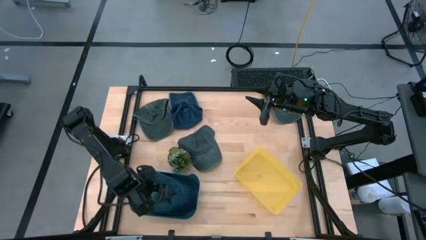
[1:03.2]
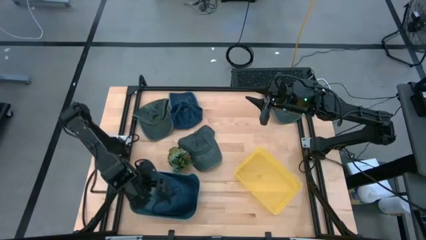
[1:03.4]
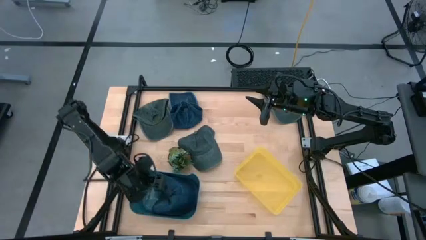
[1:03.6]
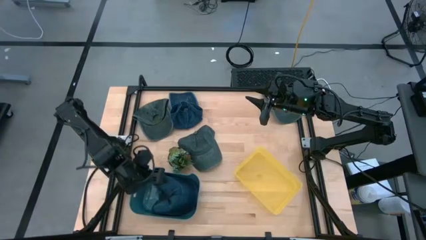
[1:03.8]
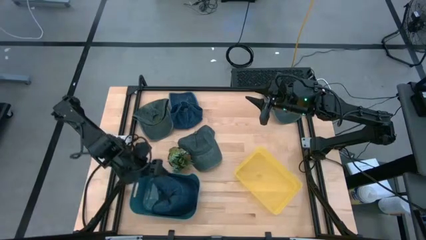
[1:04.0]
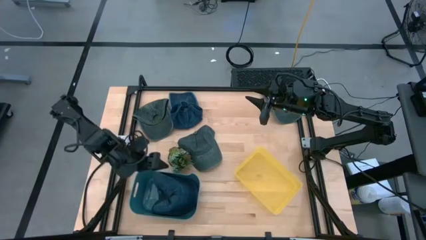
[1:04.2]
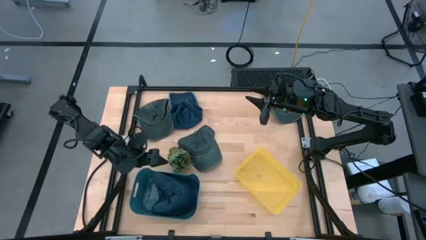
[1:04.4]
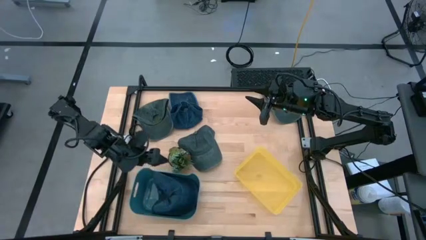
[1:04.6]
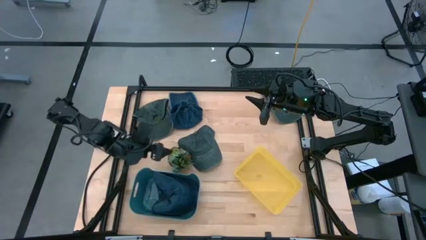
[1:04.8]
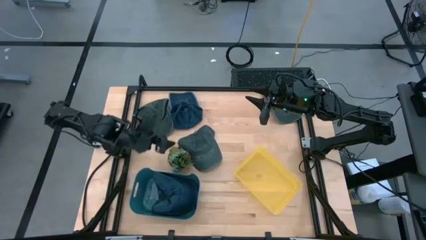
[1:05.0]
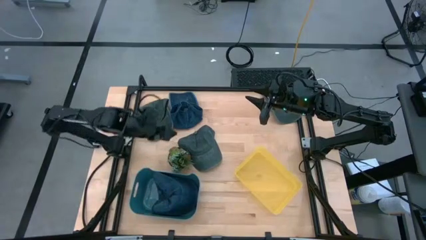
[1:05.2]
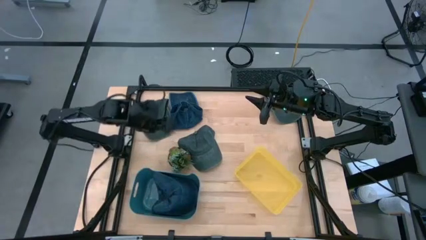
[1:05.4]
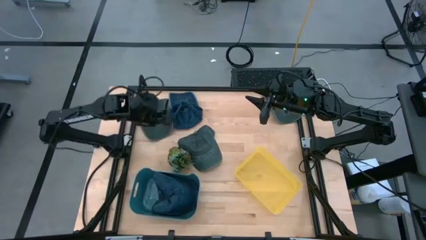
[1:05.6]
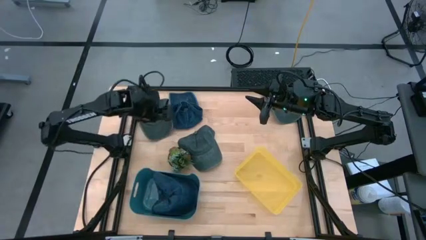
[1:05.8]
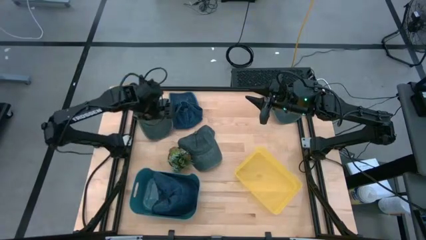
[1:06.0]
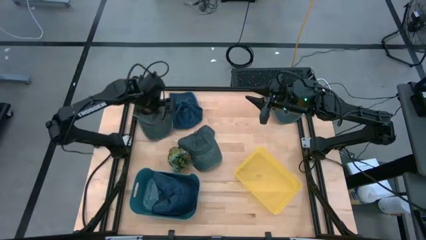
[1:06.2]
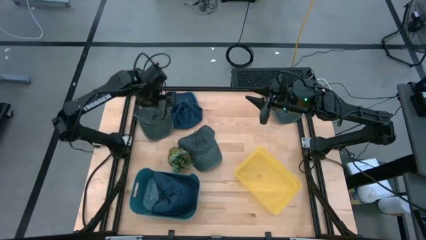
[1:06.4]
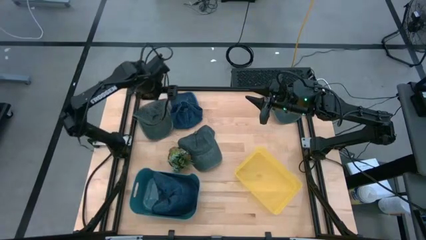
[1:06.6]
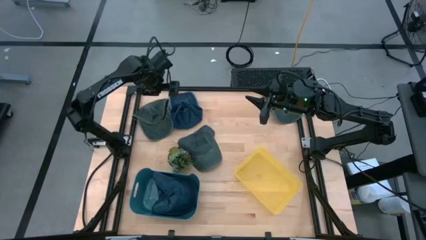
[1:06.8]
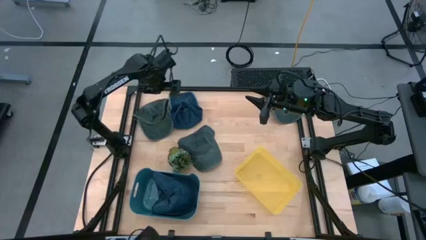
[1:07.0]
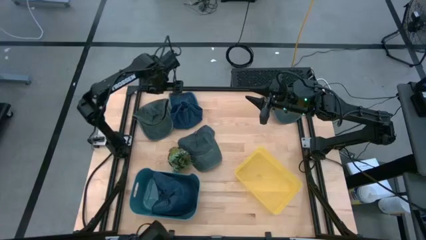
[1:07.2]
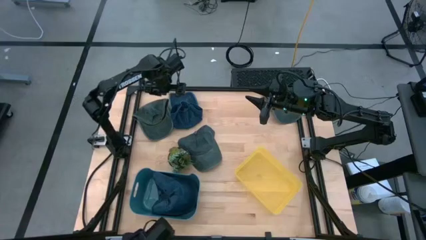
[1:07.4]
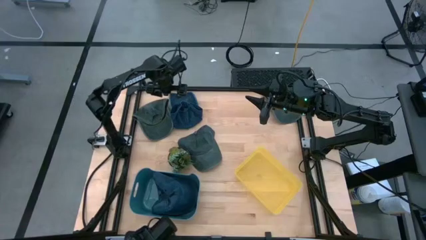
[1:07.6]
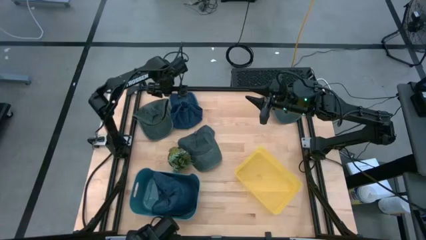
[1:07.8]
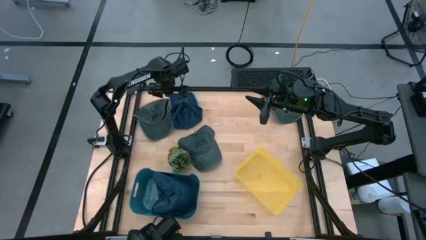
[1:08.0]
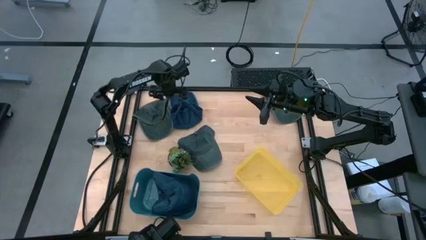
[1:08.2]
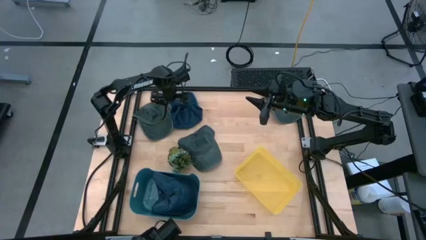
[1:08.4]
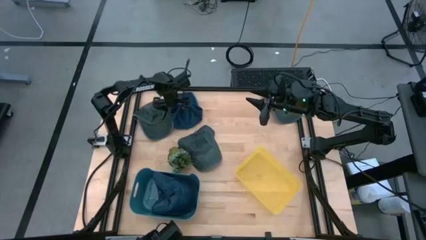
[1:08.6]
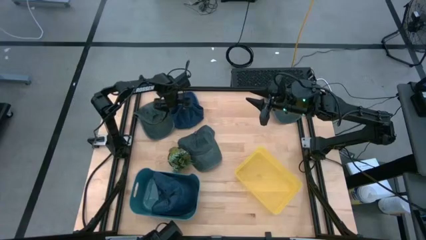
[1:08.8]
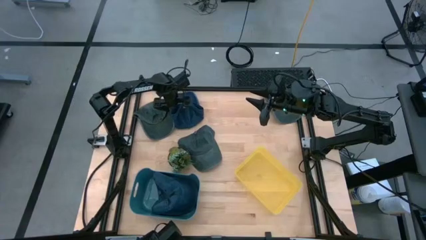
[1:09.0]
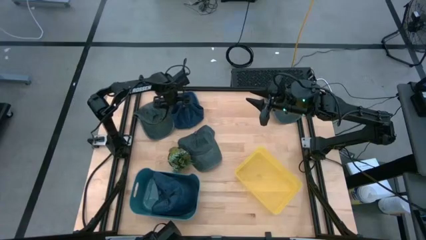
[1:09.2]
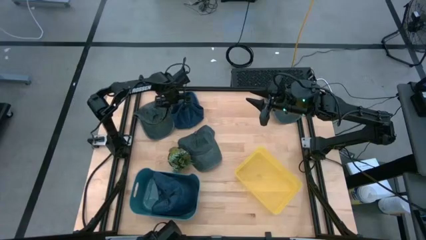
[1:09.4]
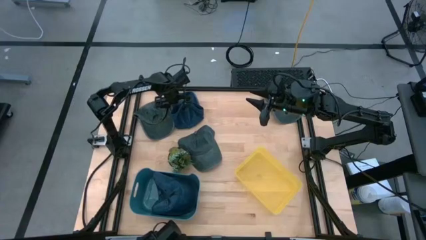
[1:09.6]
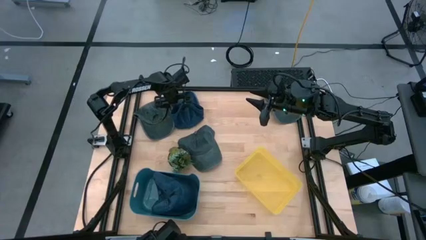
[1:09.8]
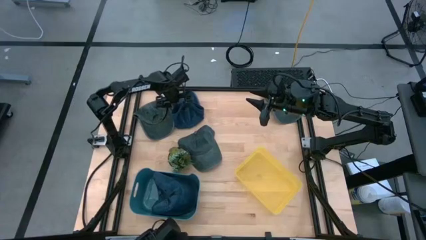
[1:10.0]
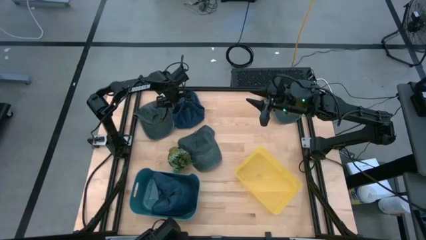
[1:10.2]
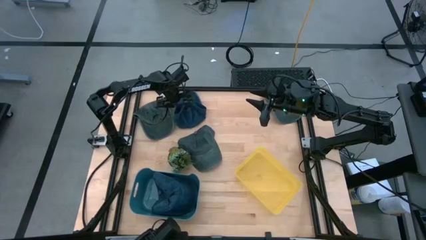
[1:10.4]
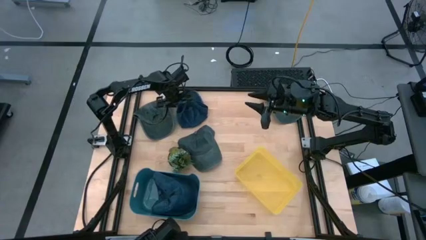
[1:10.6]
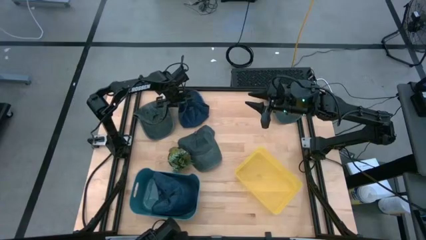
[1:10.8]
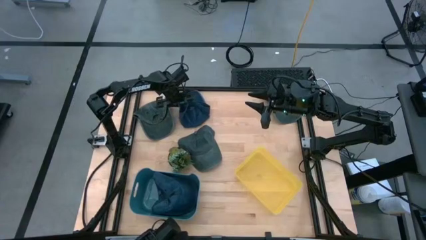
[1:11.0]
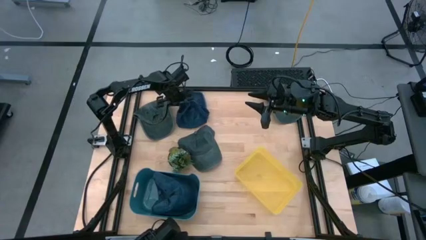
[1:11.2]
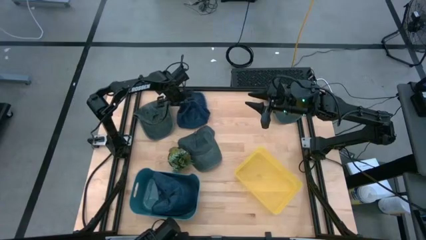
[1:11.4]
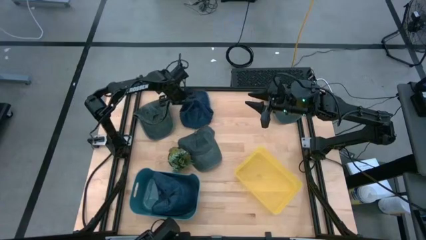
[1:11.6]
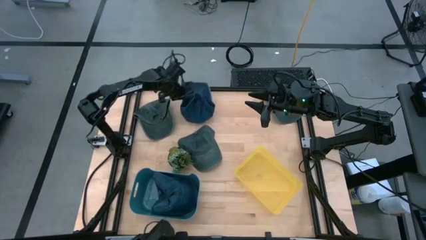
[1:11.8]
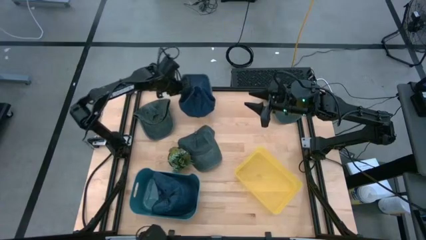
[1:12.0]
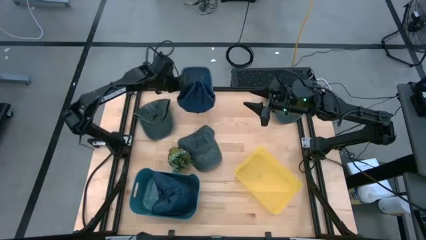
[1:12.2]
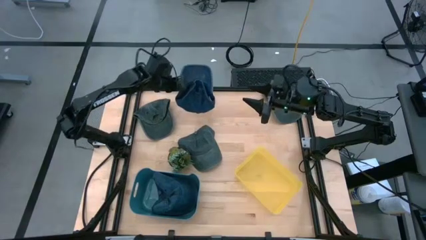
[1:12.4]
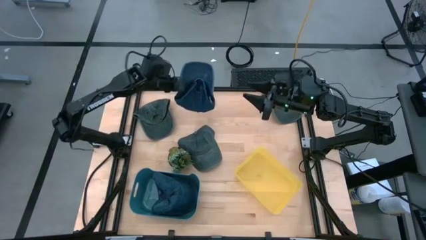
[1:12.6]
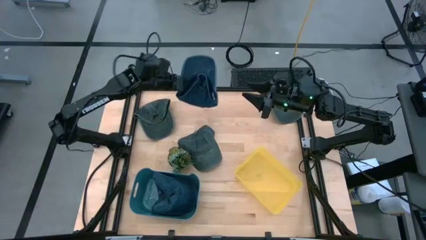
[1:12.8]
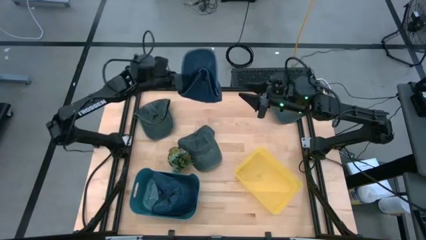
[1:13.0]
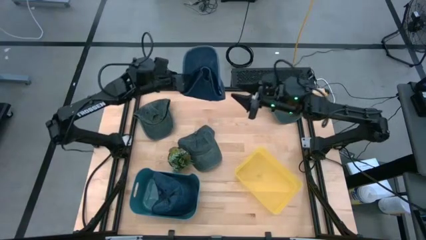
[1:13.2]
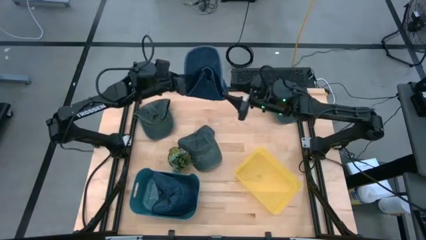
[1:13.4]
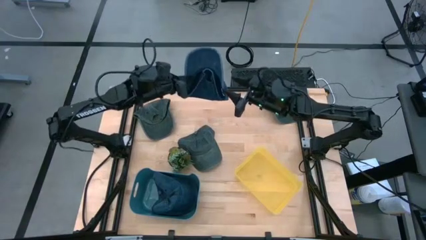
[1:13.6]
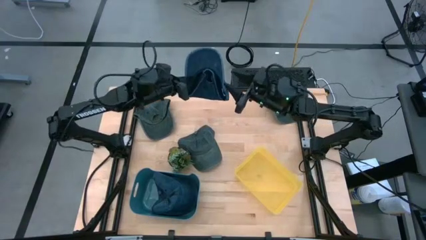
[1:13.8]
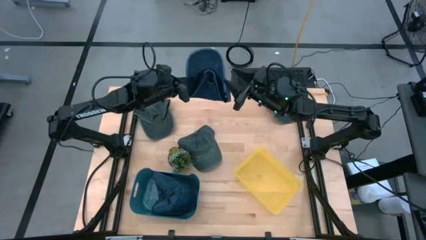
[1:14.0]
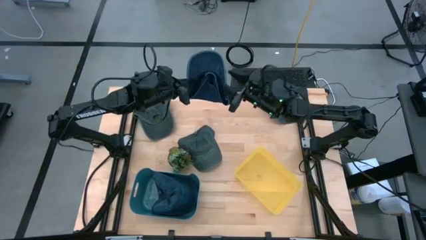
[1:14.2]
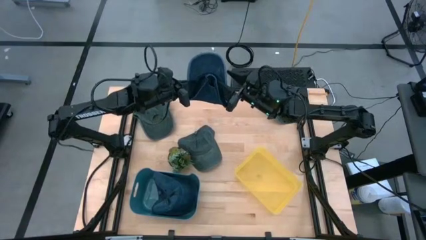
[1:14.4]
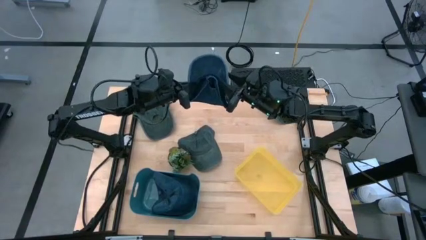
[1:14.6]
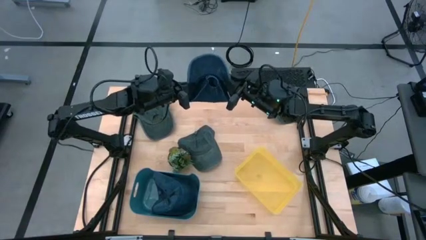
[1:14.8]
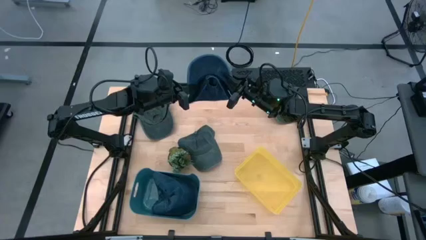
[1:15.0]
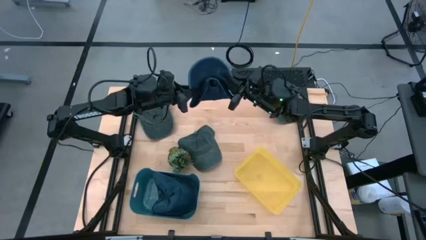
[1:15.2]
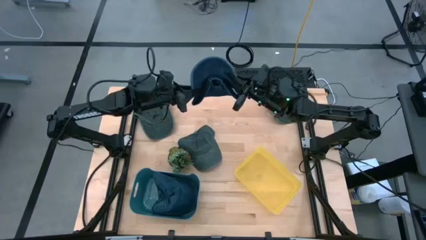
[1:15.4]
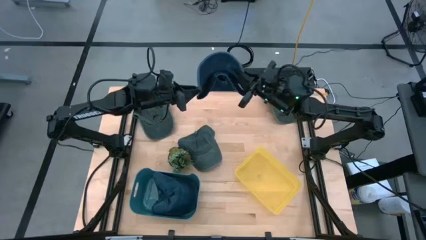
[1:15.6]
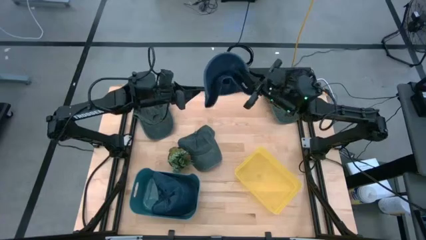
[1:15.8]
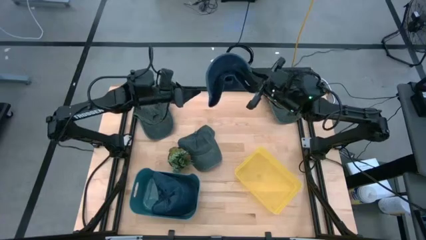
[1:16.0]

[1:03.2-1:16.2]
Task: Pick & Place hat
Put the blue cap into the blue bin
